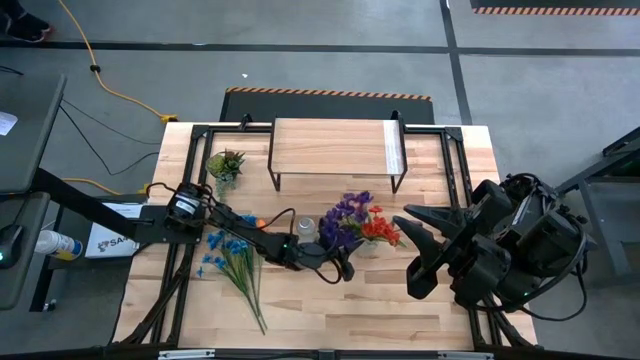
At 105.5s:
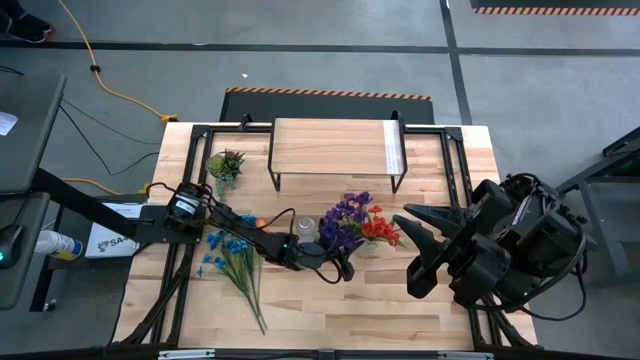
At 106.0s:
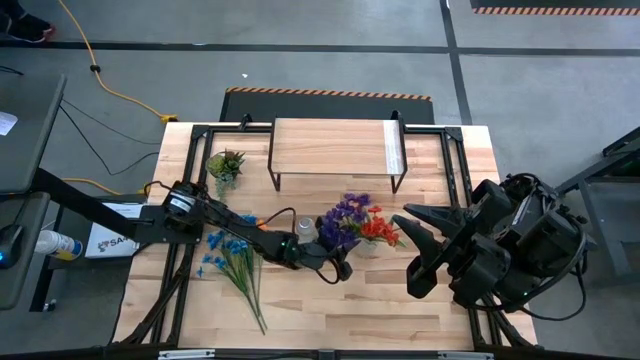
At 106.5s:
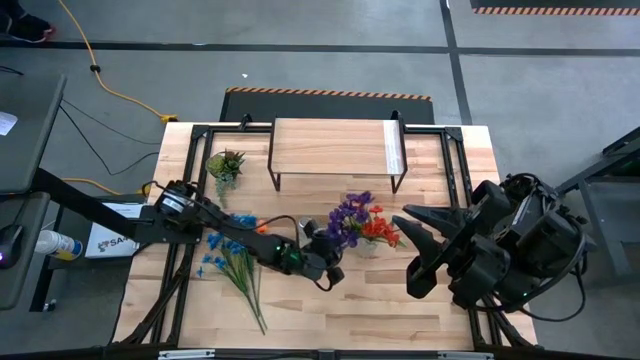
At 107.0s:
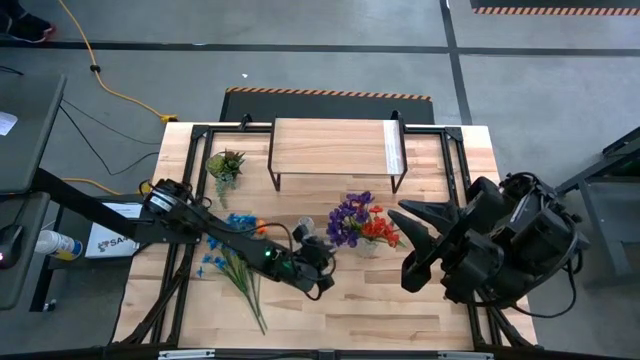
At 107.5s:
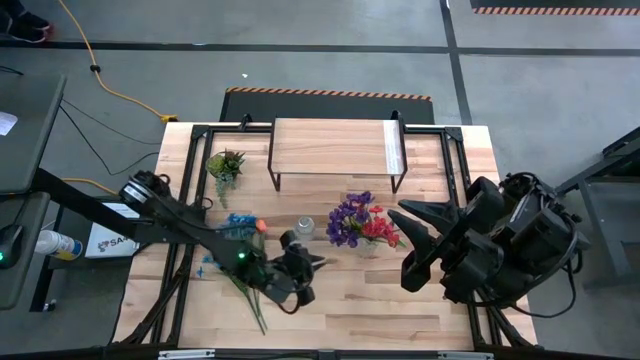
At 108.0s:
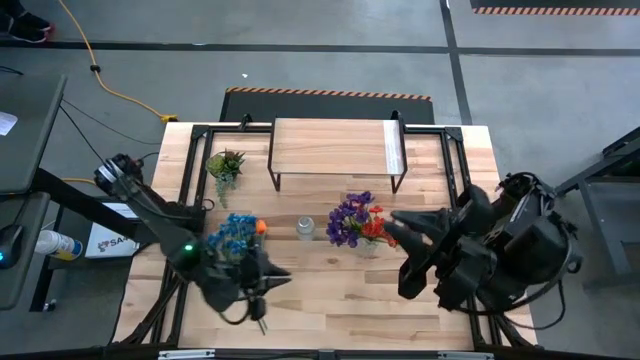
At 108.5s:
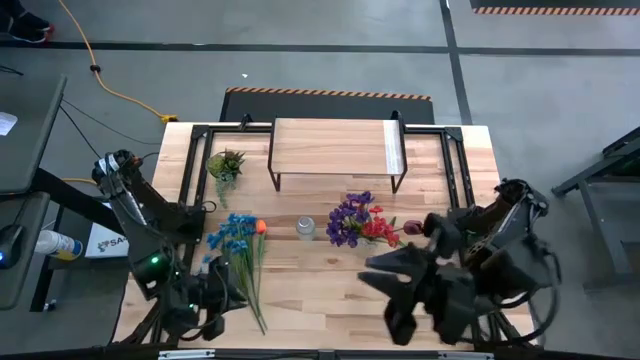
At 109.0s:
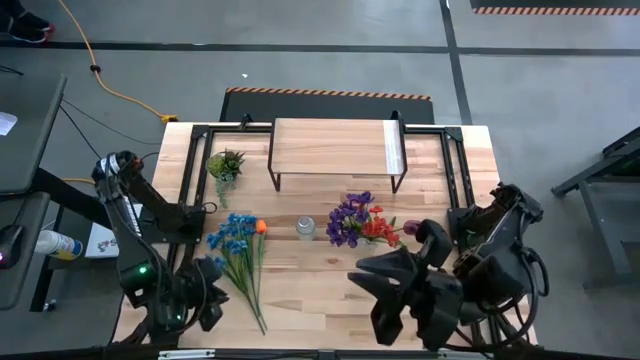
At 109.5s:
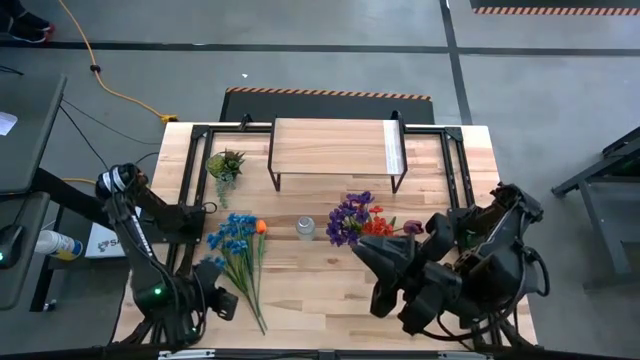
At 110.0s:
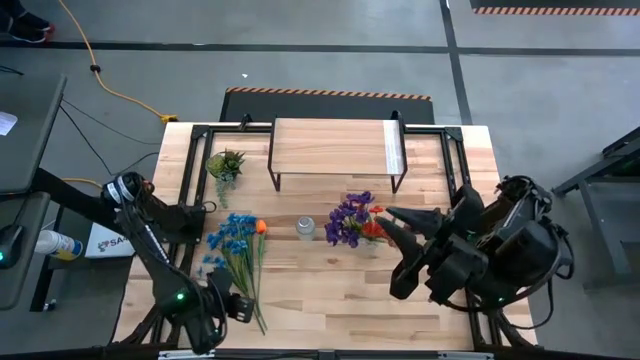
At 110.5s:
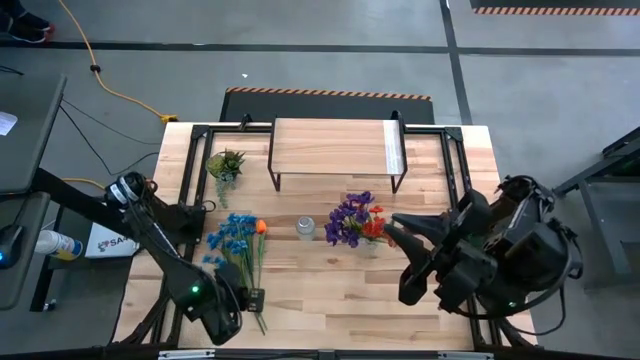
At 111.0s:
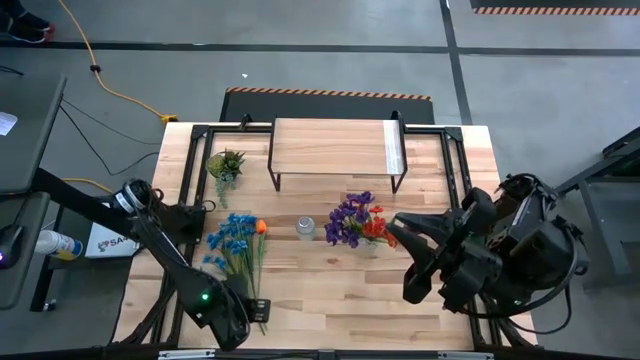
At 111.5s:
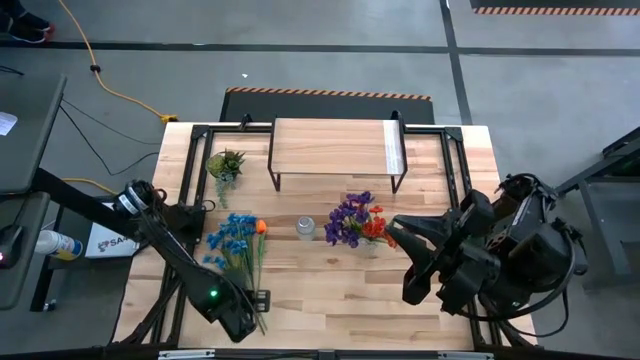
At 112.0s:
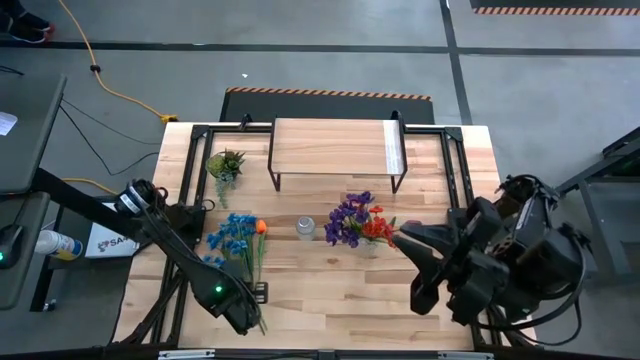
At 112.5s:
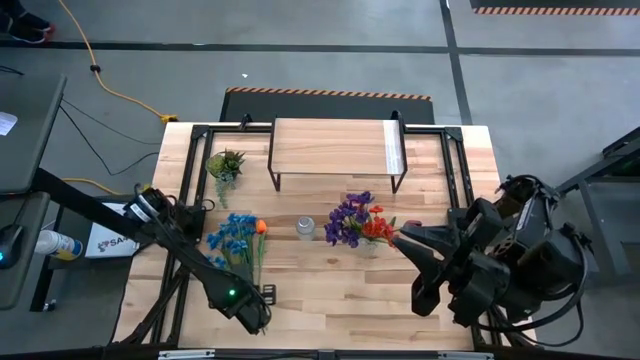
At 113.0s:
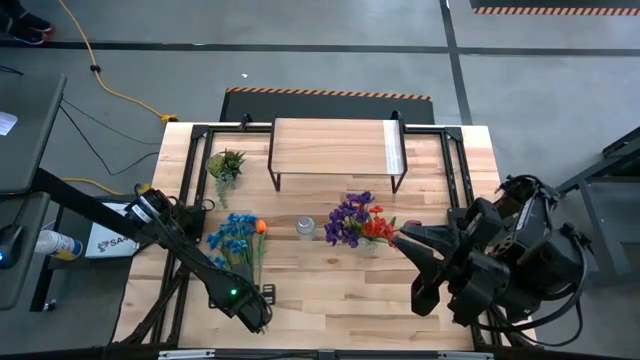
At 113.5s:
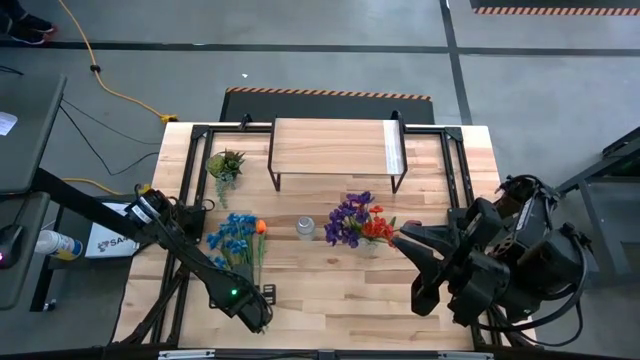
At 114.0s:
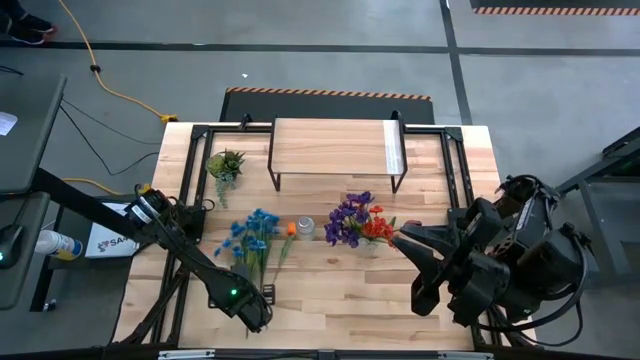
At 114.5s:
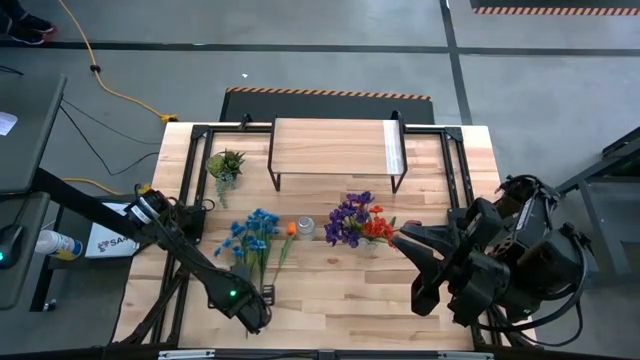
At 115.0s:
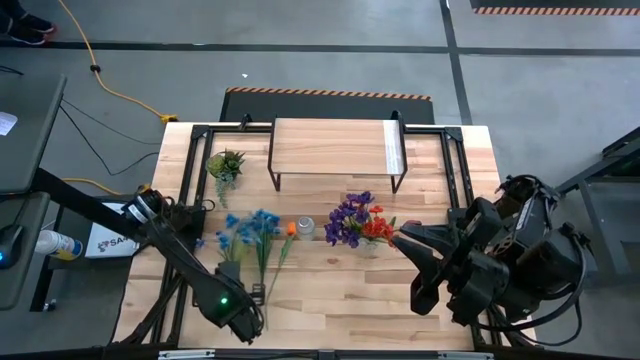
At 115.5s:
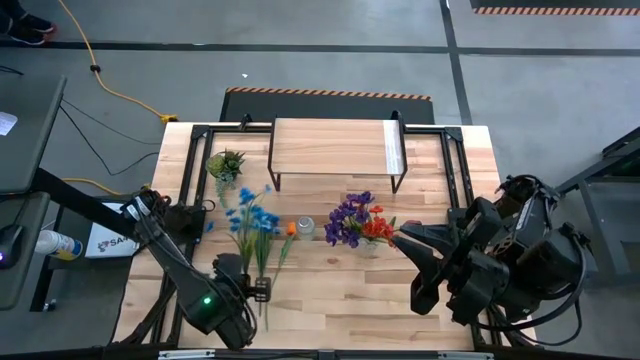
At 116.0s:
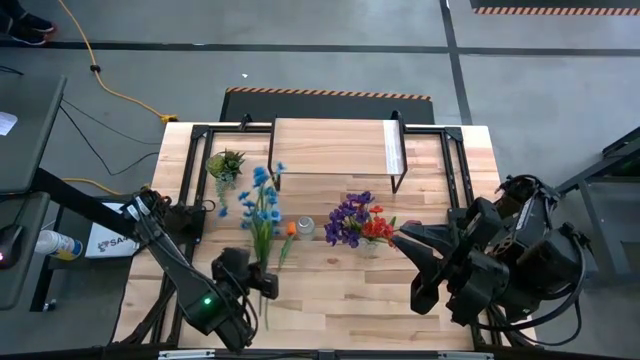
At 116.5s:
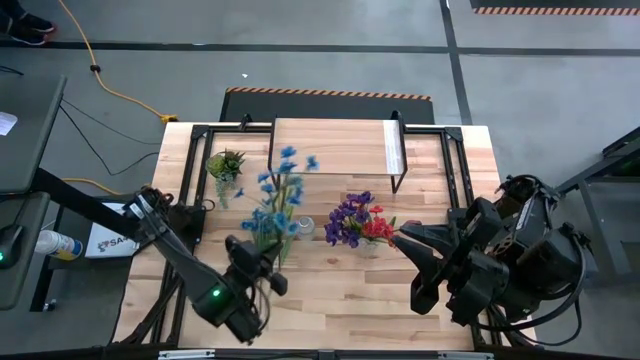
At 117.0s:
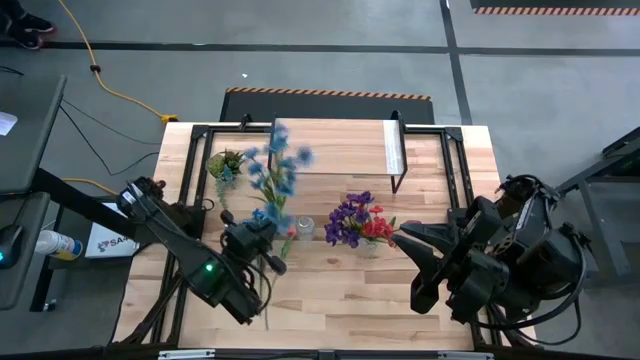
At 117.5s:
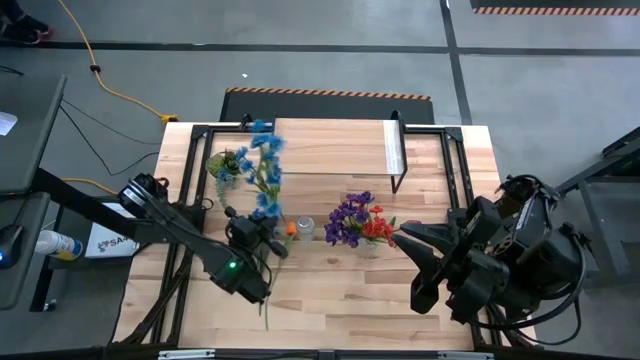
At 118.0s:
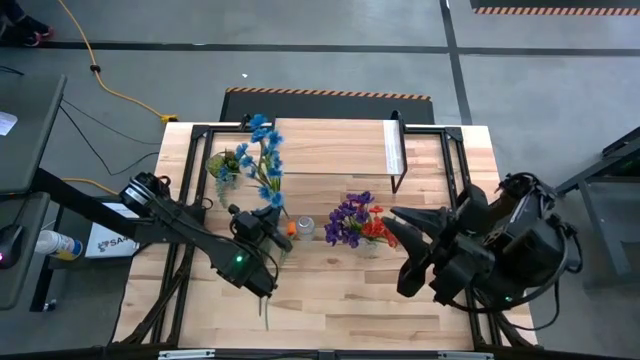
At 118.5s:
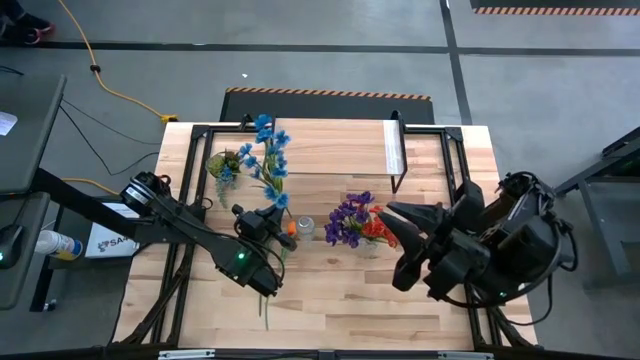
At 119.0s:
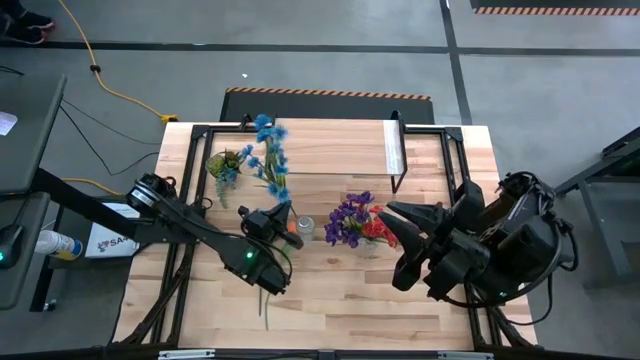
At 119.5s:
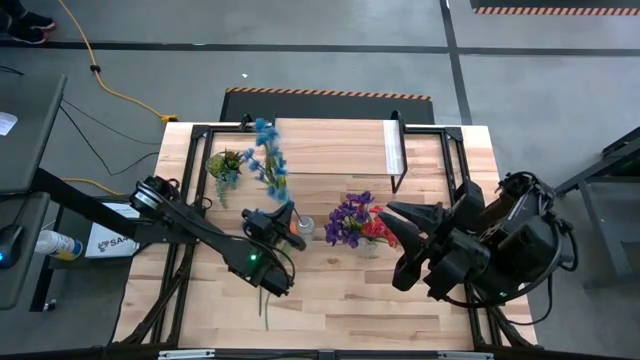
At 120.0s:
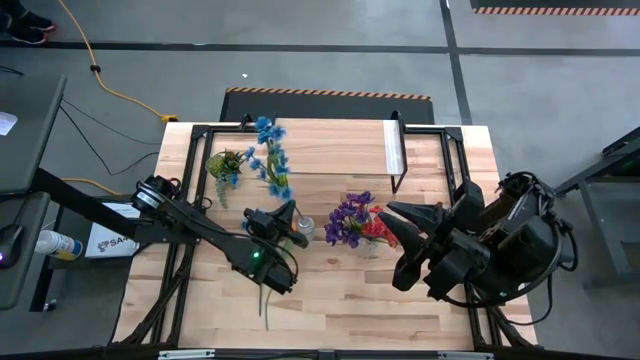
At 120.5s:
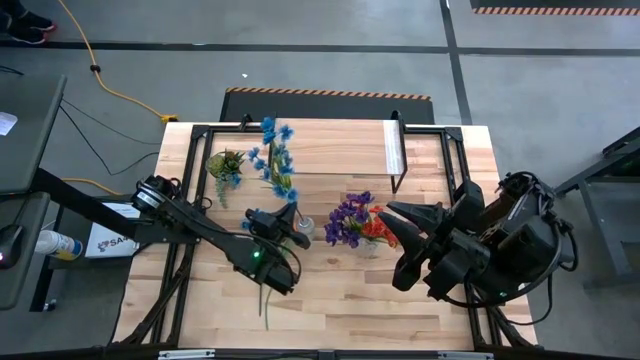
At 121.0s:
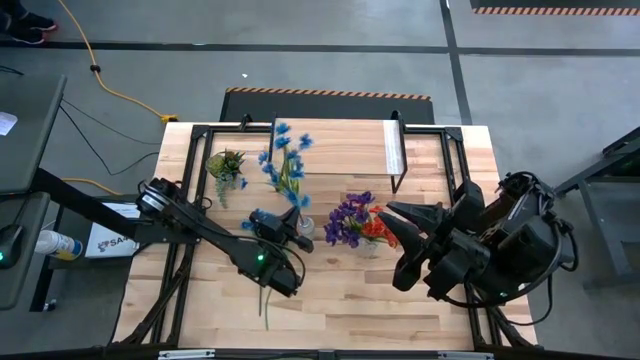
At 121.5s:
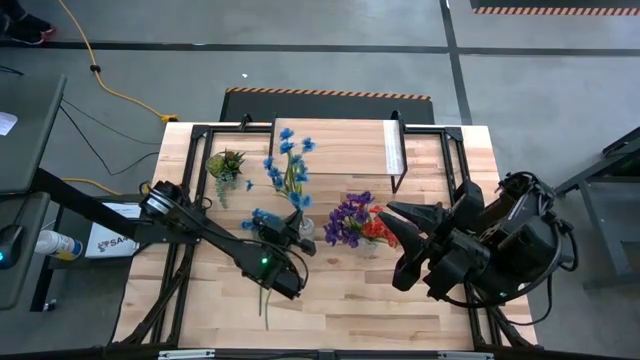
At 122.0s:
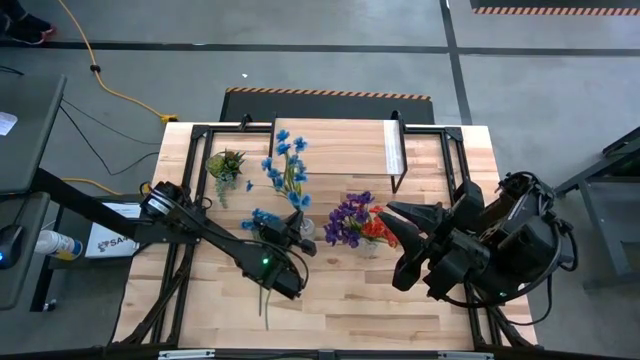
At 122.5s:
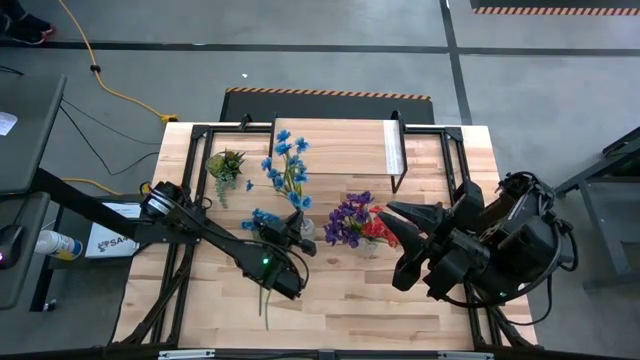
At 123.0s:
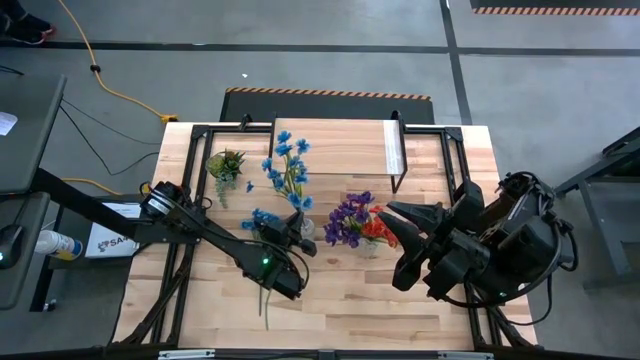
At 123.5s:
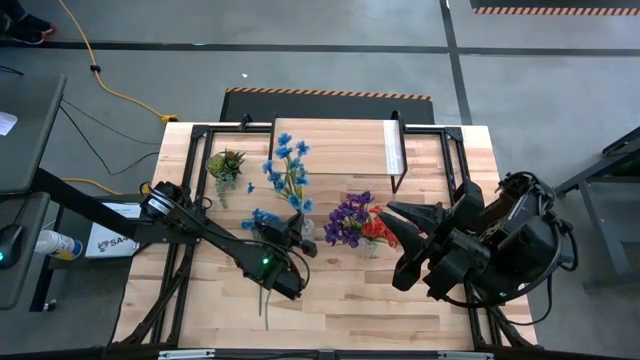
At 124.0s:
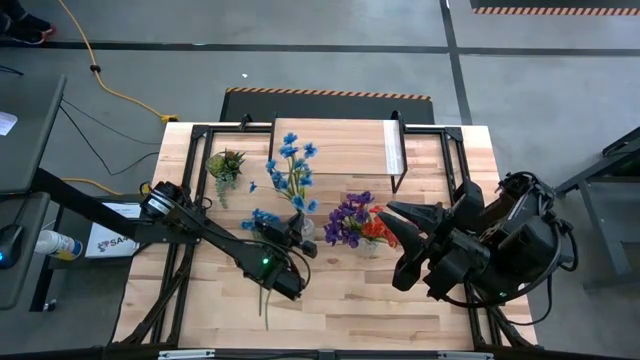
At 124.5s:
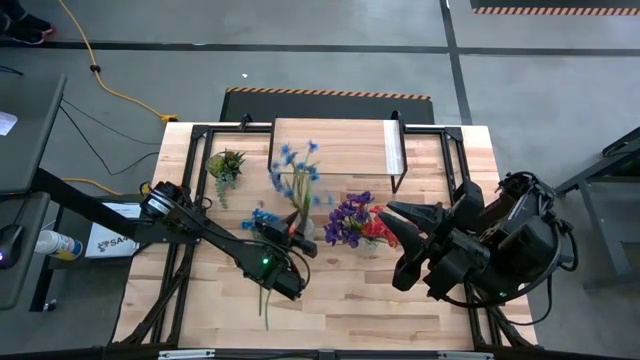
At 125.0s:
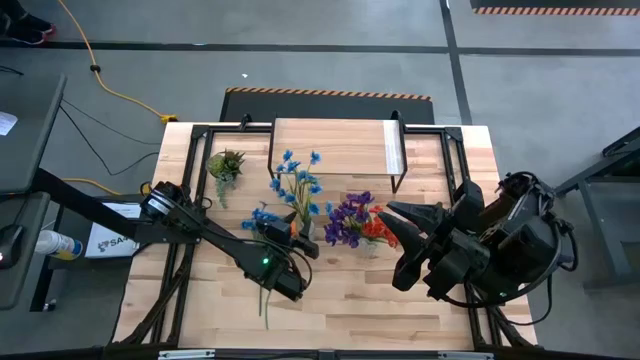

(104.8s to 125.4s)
Task: Pick and place flowers into a vace then onto a shelf
Put the left blue flowers into the left transparent flower vase

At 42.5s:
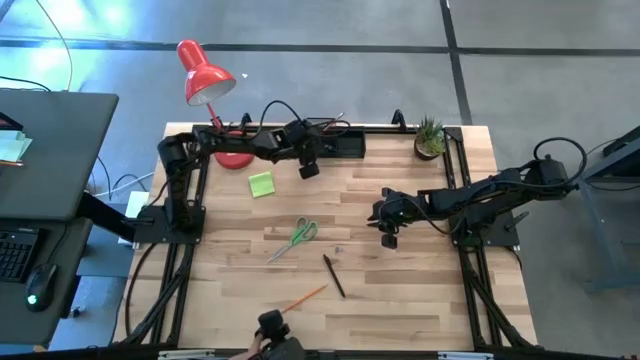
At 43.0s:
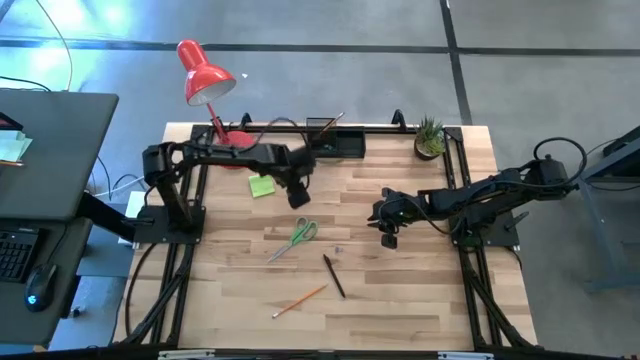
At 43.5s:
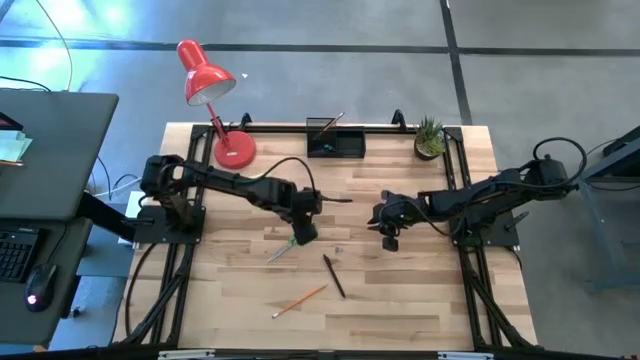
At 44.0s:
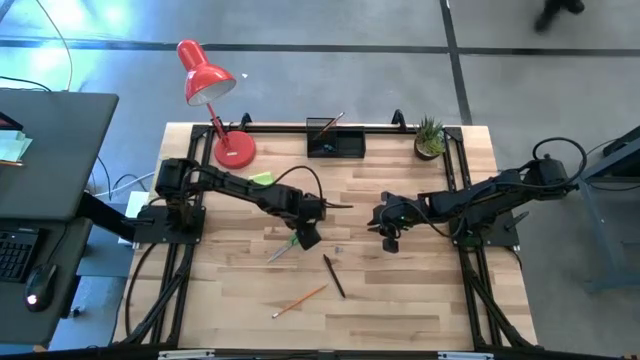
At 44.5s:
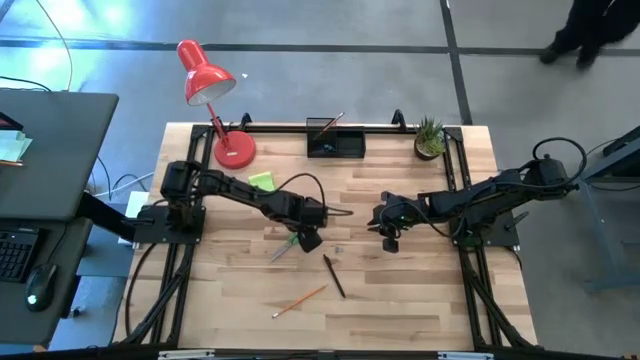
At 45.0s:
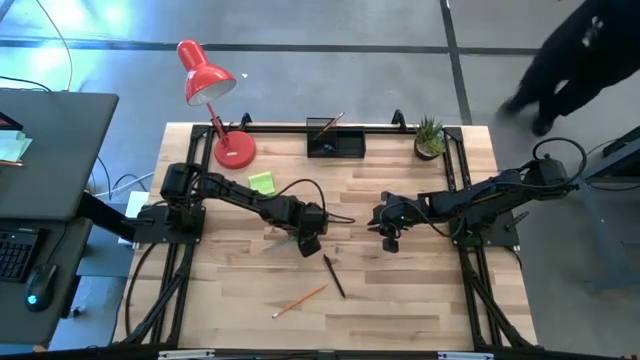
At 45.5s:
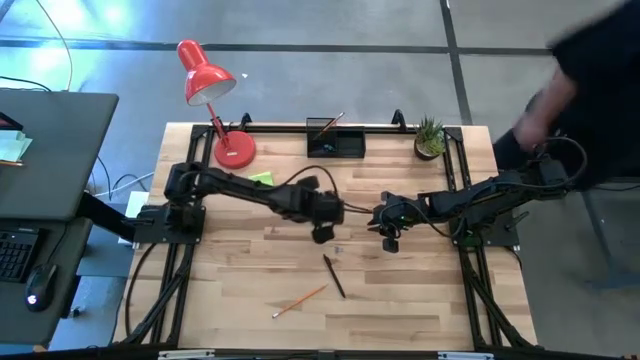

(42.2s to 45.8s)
Task: Pick and place office supplies into organizer
Put the green scissor into the desk organizer
